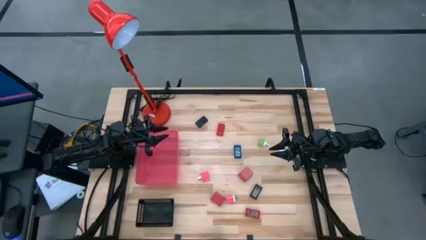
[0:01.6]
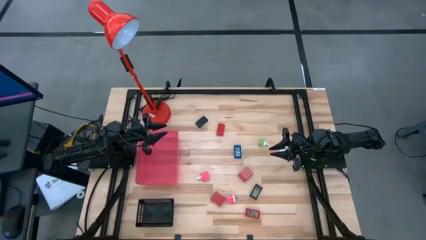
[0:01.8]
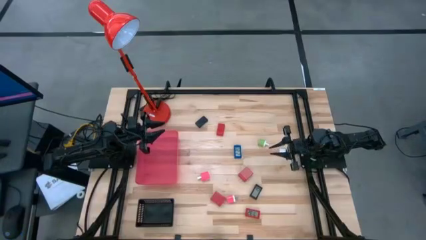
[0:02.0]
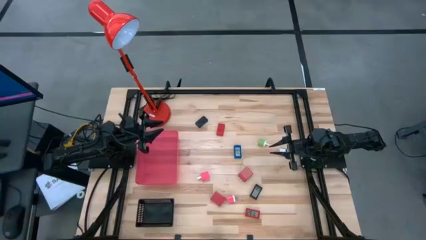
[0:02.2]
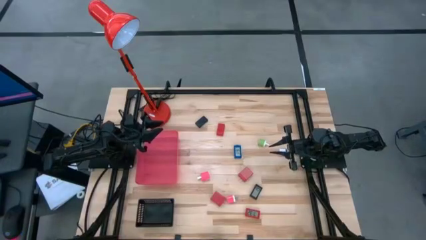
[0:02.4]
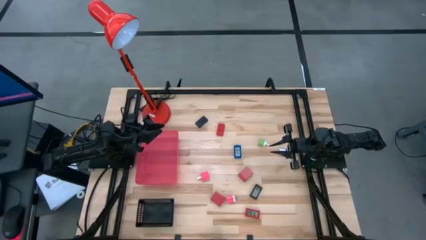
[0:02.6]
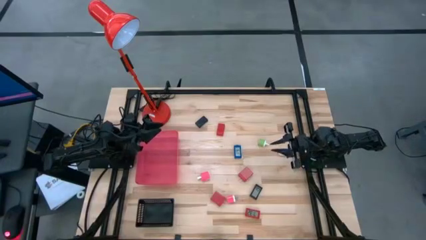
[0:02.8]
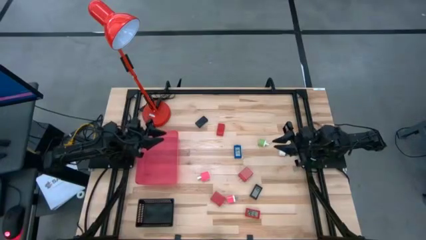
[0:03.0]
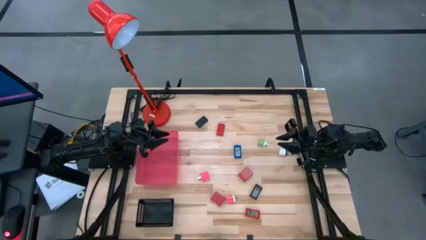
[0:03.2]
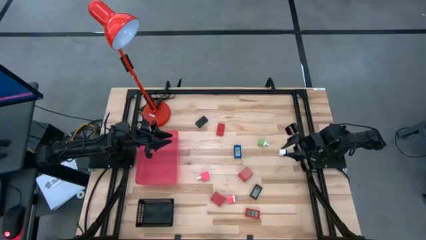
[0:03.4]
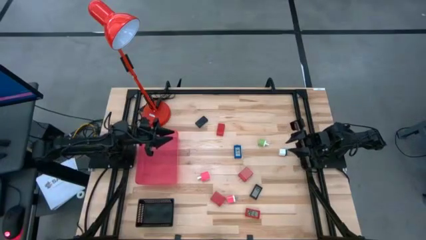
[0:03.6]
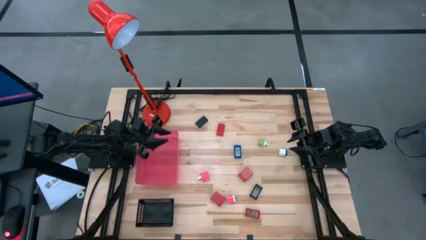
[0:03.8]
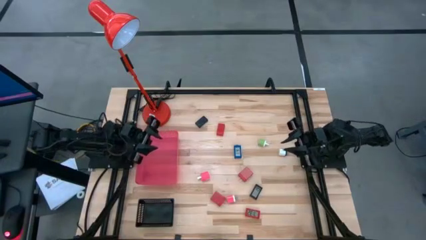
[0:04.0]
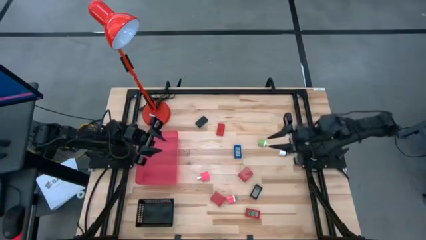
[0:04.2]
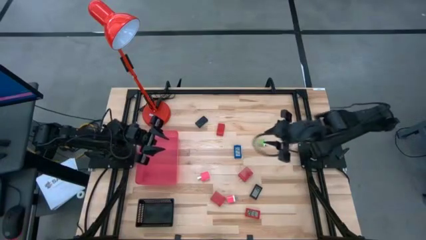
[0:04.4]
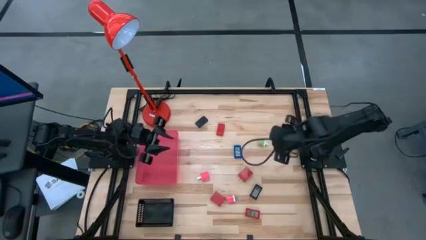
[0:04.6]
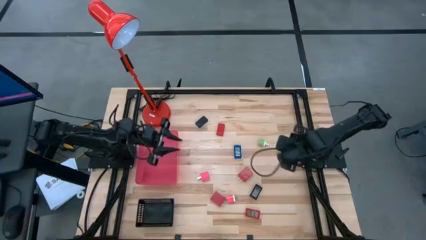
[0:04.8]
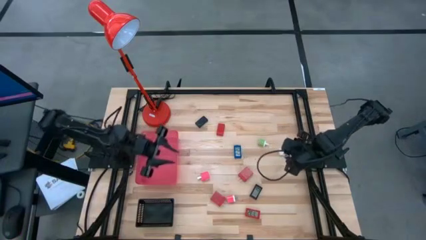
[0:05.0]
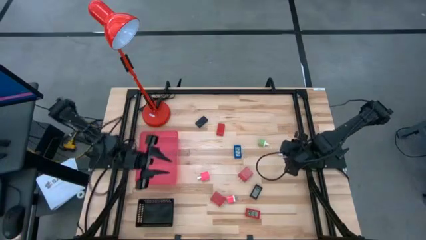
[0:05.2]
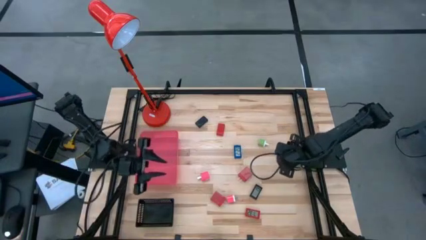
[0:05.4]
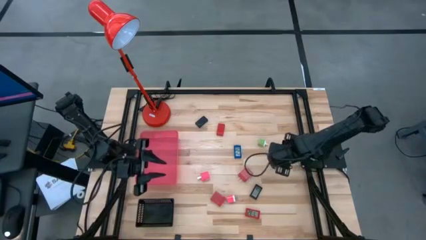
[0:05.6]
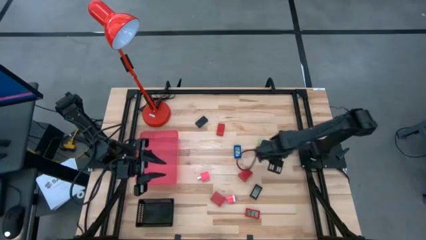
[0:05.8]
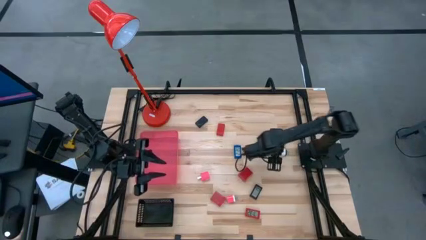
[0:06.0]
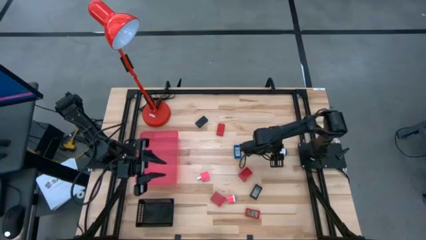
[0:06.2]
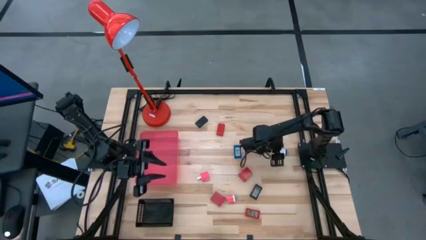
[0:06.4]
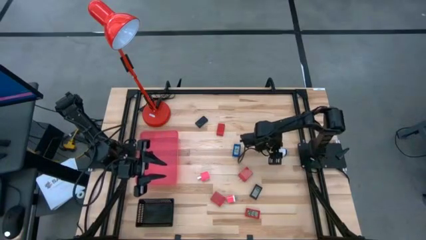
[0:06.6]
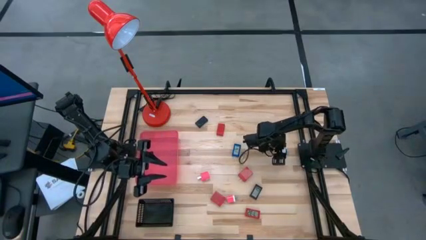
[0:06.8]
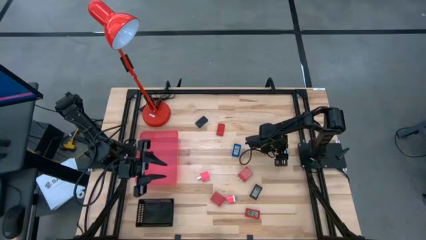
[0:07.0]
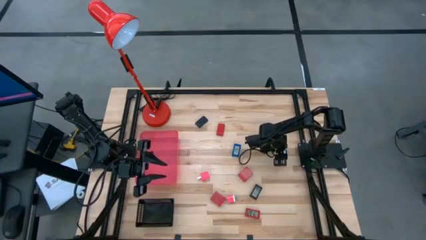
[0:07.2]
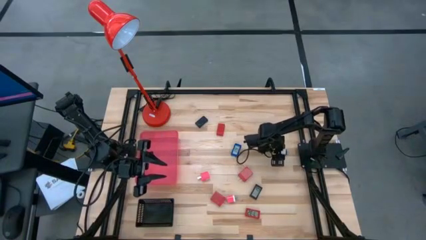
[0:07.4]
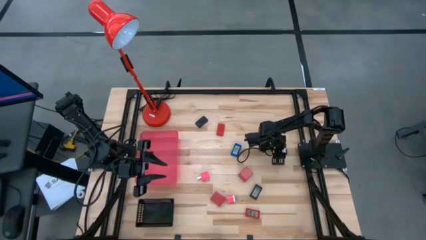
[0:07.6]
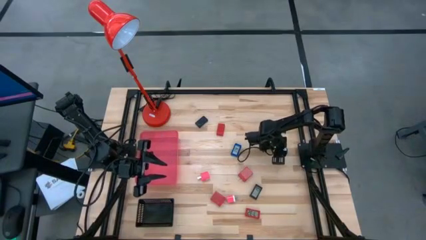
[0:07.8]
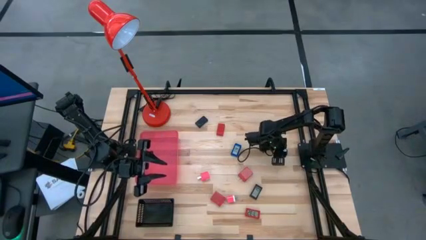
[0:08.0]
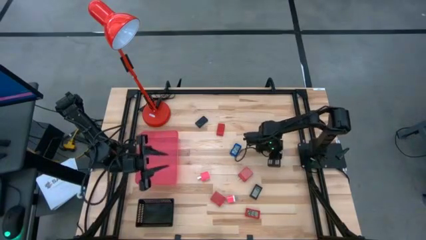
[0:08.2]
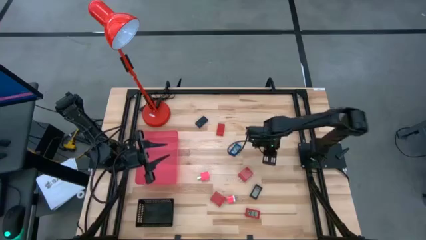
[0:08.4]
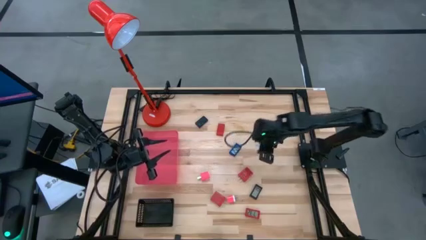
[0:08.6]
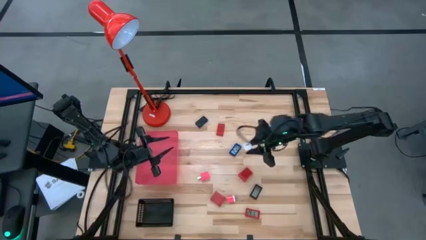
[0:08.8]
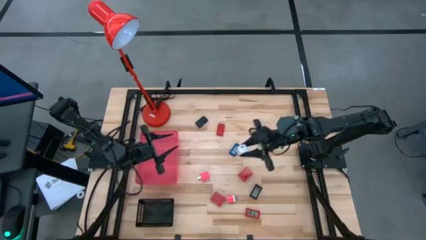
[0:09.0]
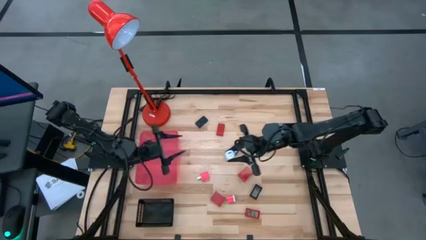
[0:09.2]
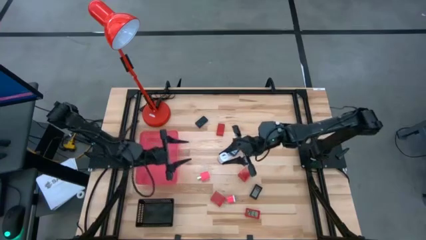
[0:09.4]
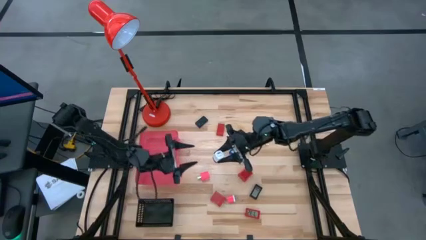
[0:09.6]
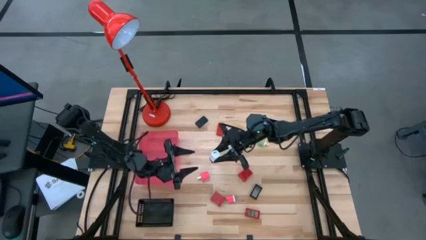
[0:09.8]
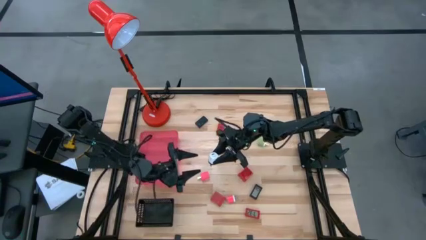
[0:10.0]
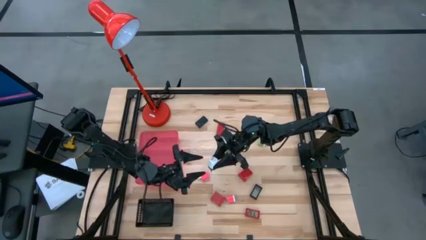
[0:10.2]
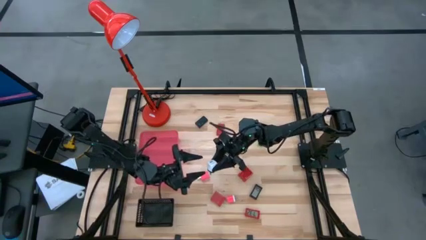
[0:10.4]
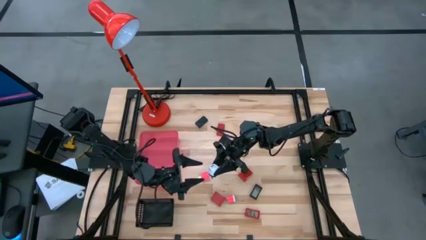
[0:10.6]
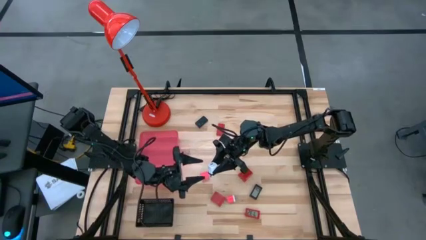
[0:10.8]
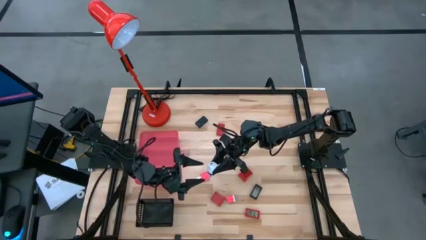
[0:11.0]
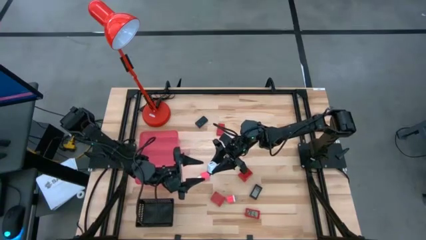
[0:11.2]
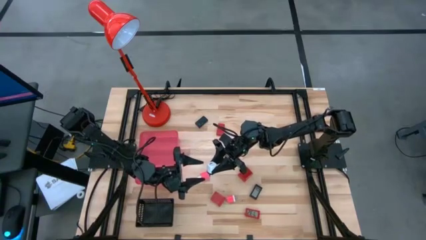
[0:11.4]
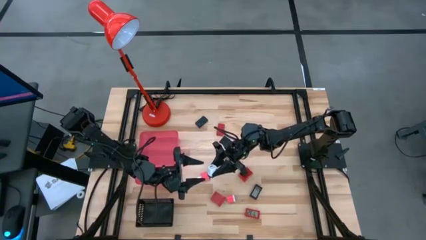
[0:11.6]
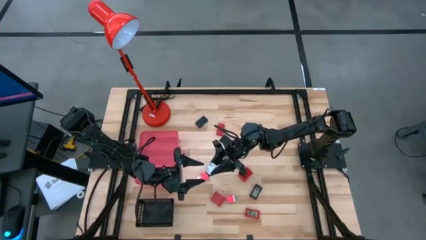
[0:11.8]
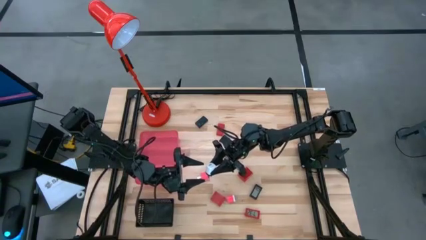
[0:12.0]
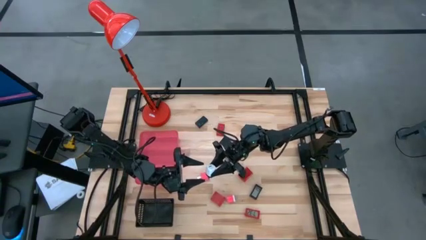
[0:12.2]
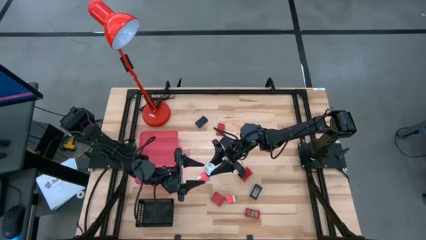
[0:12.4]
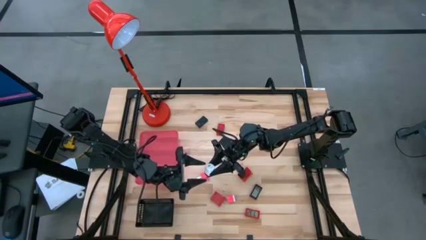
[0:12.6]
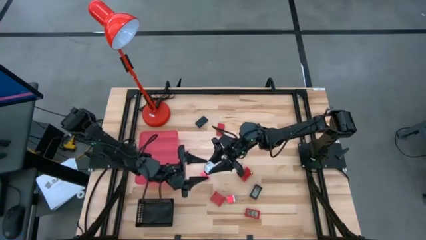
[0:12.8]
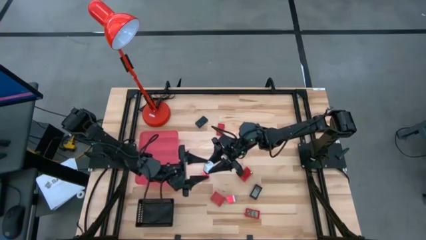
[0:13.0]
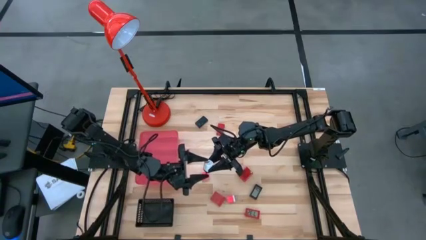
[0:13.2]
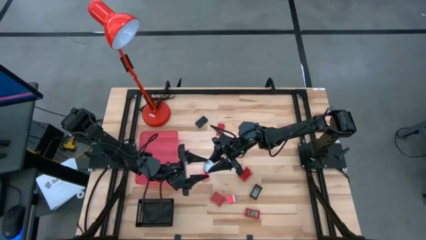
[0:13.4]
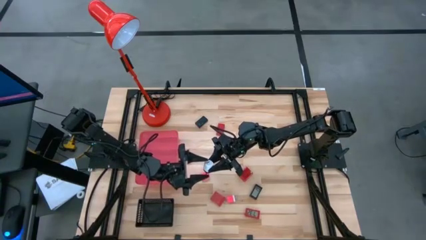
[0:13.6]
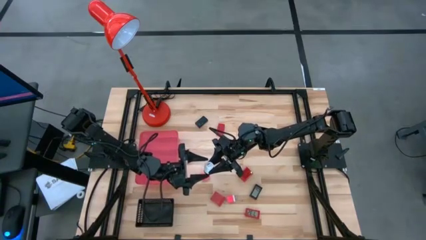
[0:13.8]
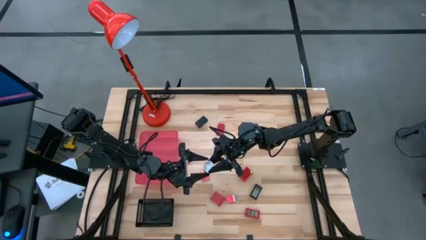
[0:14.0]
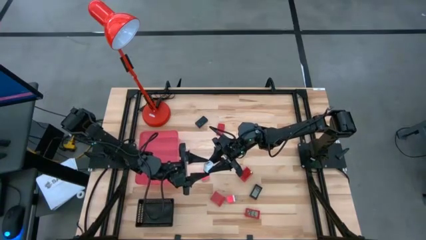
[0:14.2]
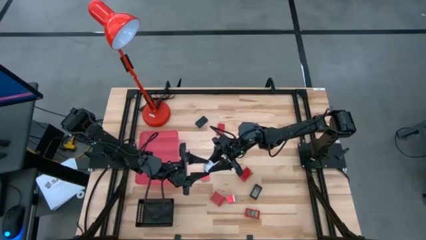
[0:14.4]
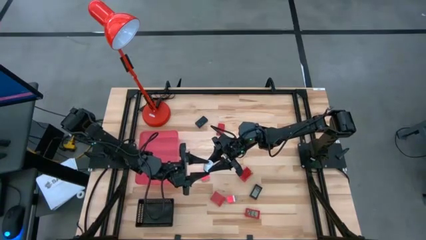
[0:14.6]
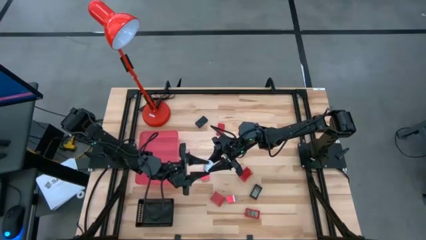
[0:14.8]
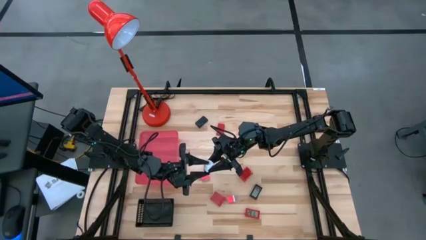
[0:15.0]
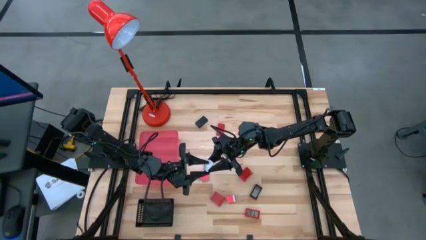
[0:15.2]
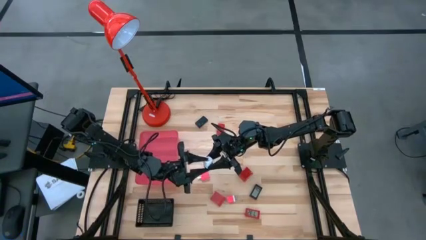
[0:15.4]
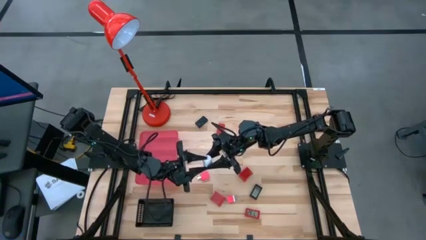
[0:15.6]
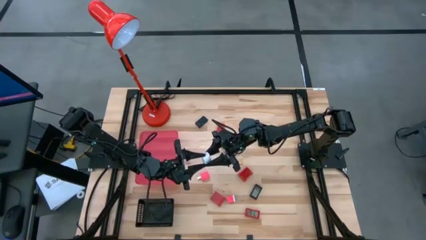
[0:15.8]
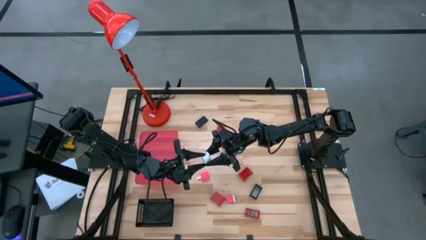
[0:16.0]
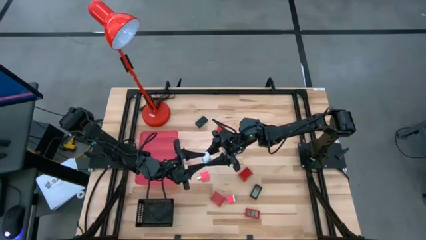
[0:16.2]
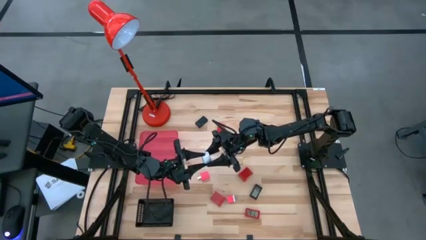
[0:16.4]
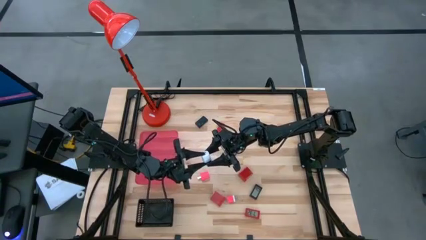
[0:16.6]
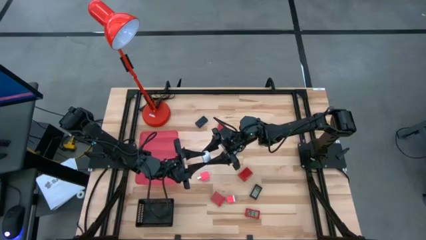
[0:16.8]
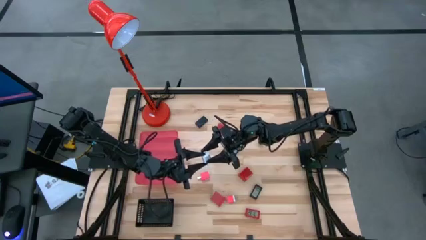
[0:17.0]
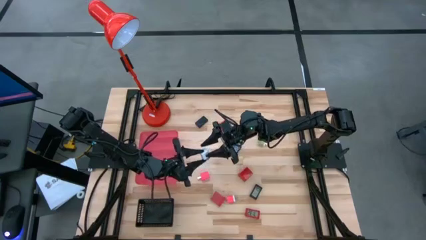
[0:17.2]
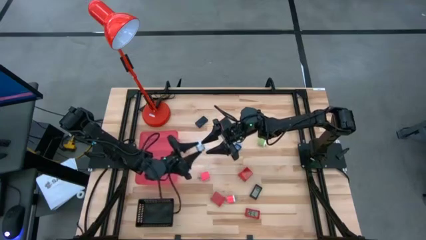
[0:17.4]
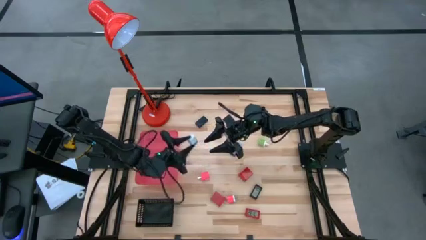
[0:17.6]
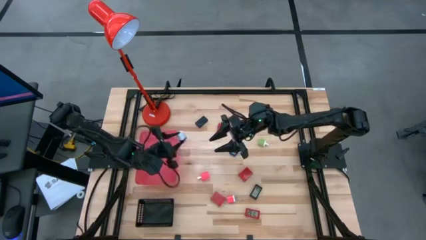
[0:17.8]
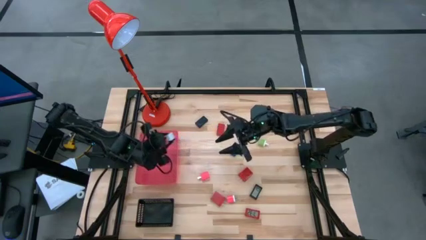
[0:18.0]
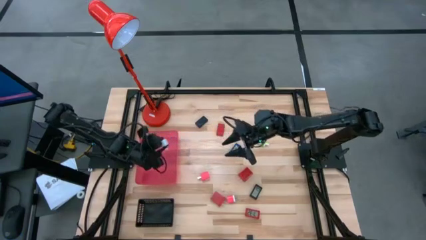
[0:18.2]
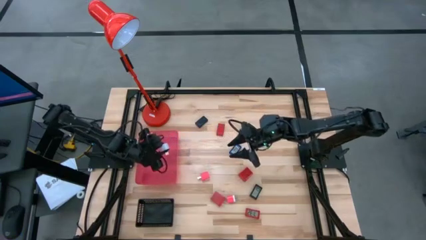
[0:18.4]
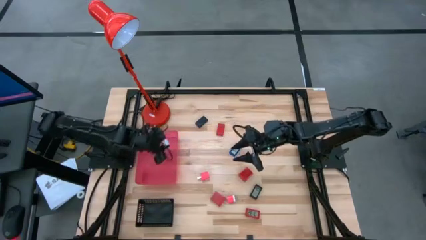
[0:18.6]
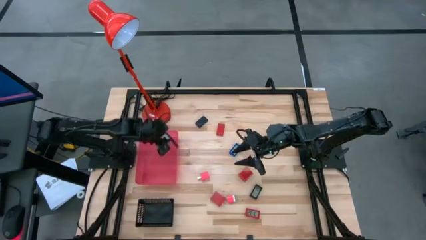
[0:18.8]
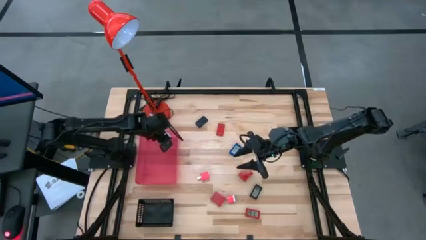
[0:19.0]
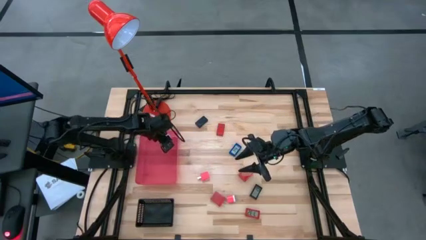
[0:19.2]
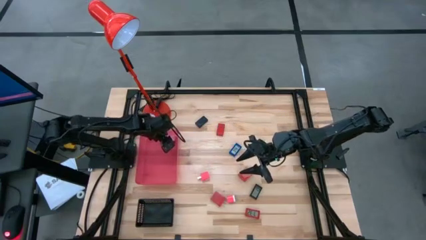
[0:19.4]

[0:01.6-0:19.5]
Task: Pick & Place Office items
Put the white charger adapter into the red bin
